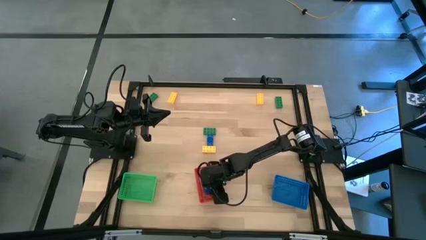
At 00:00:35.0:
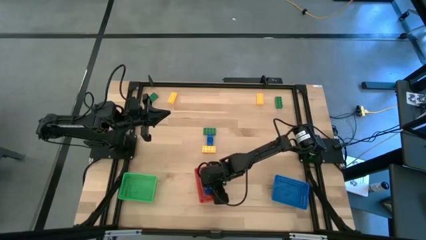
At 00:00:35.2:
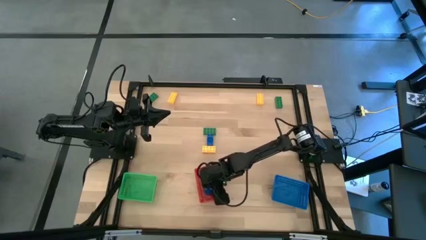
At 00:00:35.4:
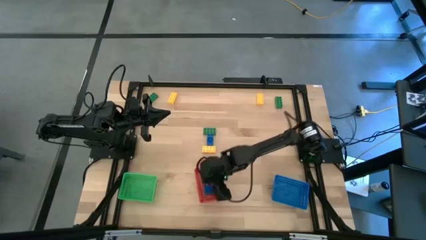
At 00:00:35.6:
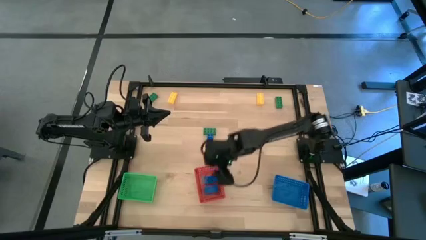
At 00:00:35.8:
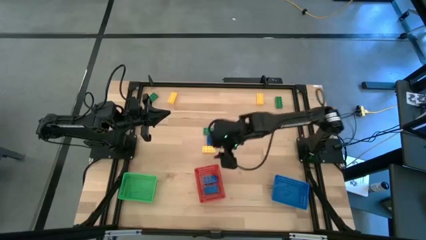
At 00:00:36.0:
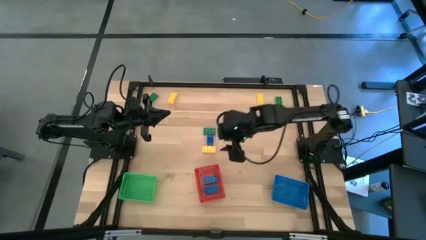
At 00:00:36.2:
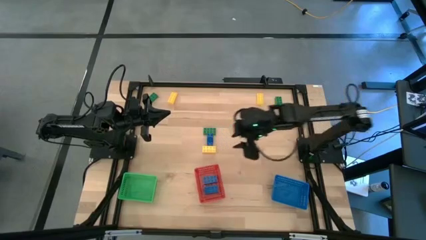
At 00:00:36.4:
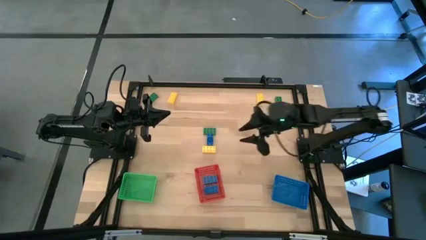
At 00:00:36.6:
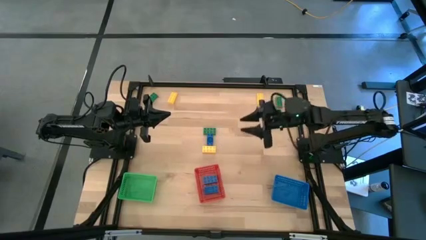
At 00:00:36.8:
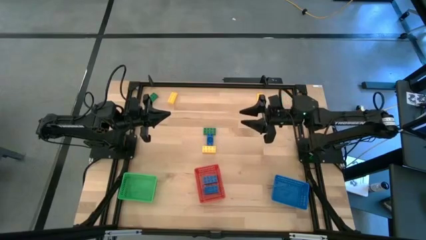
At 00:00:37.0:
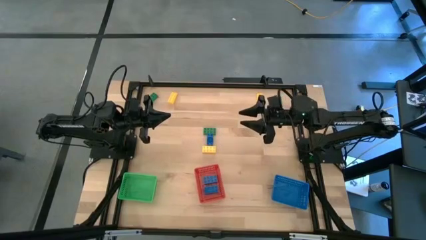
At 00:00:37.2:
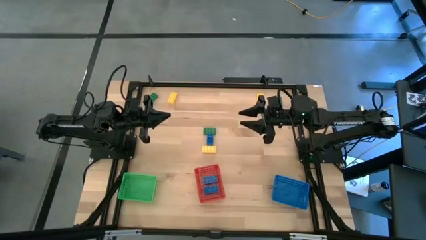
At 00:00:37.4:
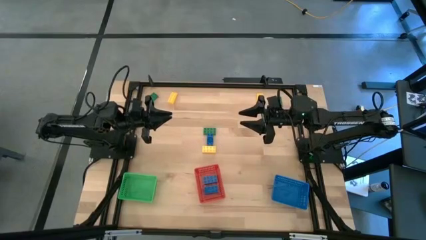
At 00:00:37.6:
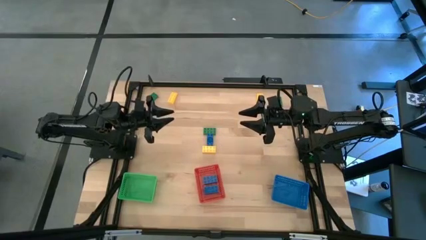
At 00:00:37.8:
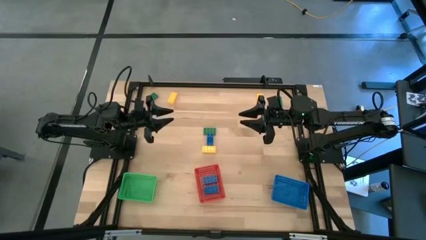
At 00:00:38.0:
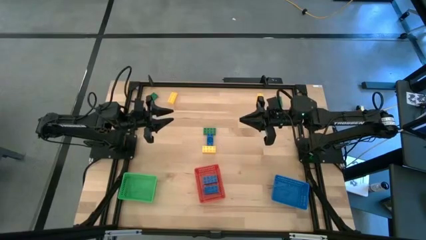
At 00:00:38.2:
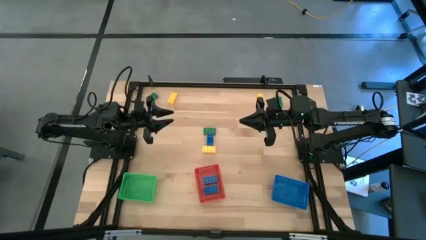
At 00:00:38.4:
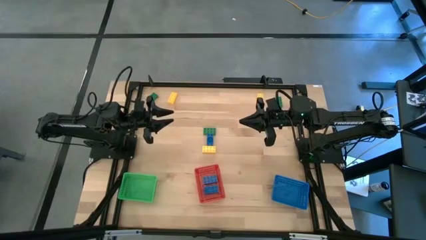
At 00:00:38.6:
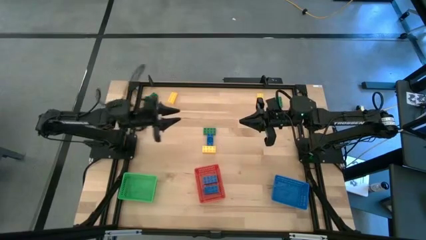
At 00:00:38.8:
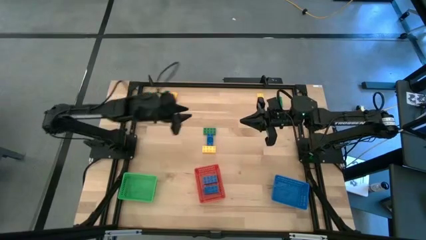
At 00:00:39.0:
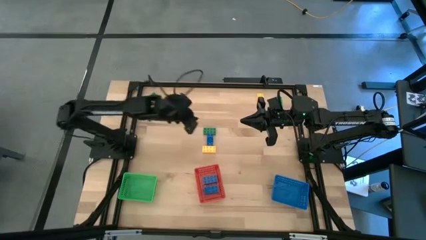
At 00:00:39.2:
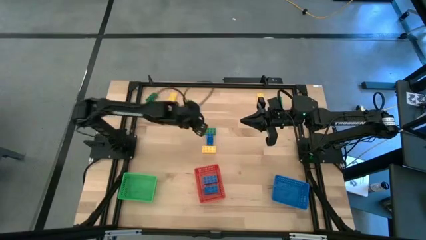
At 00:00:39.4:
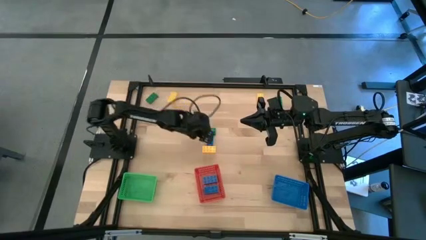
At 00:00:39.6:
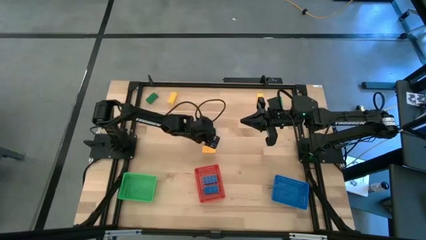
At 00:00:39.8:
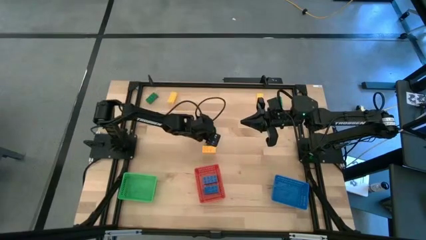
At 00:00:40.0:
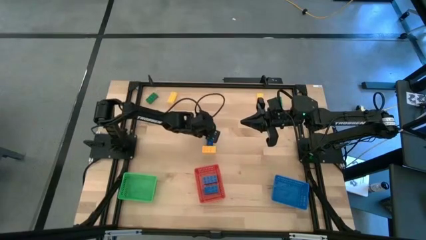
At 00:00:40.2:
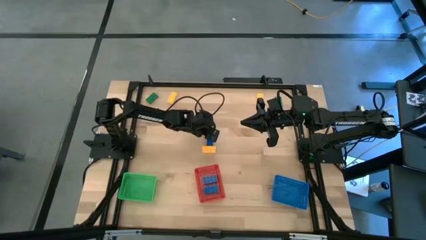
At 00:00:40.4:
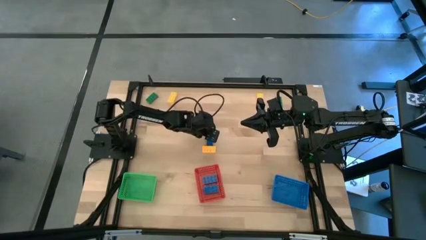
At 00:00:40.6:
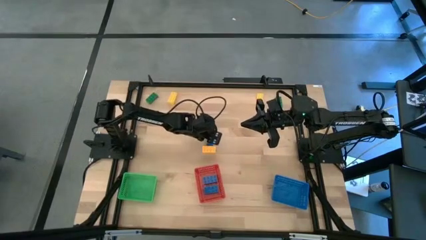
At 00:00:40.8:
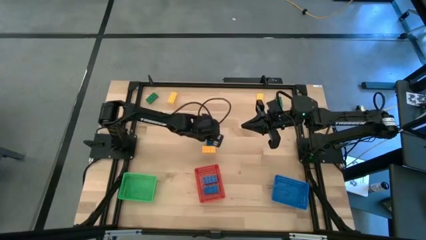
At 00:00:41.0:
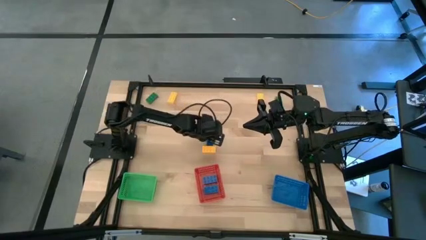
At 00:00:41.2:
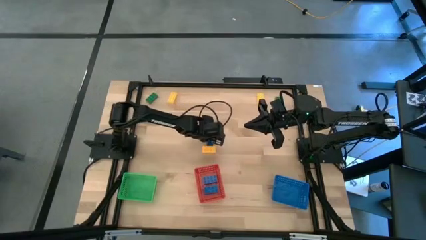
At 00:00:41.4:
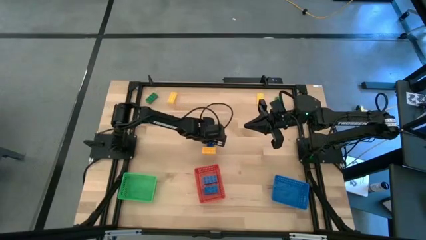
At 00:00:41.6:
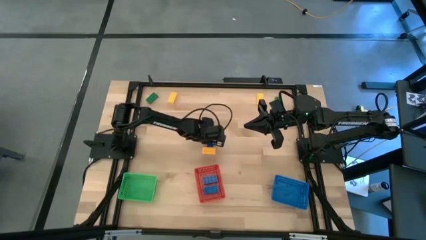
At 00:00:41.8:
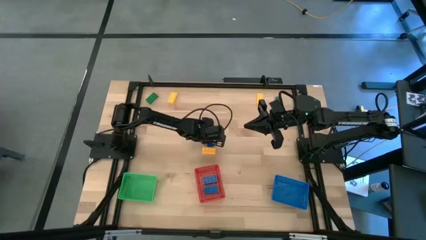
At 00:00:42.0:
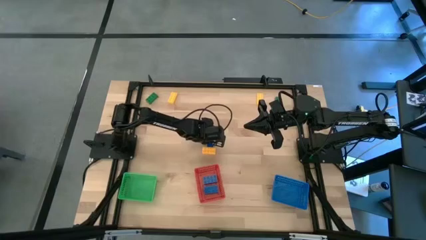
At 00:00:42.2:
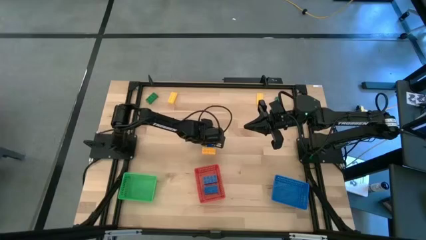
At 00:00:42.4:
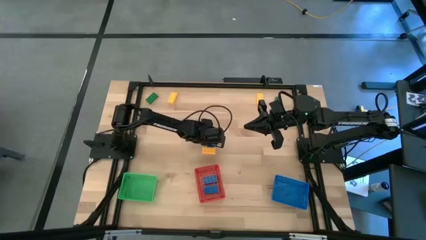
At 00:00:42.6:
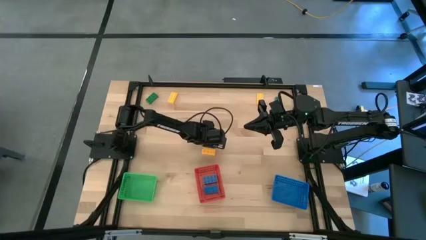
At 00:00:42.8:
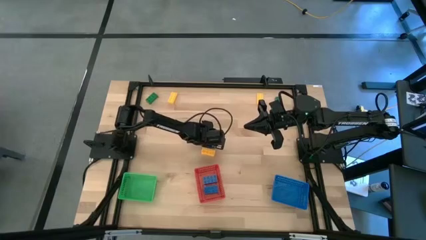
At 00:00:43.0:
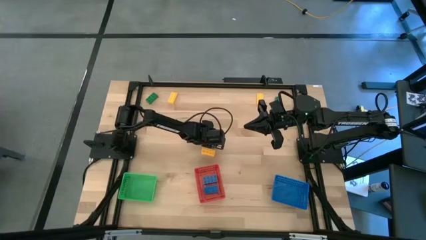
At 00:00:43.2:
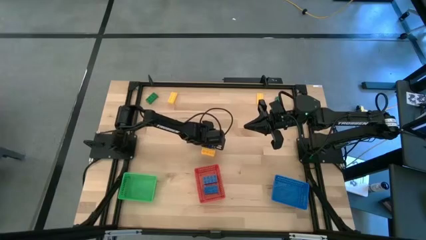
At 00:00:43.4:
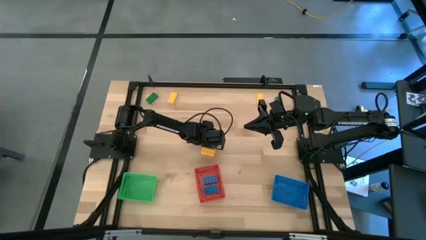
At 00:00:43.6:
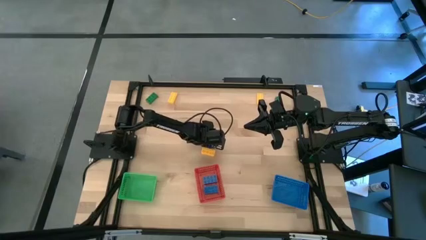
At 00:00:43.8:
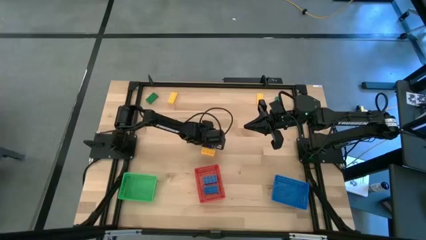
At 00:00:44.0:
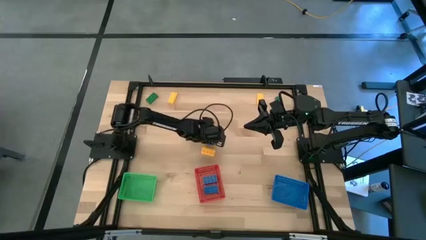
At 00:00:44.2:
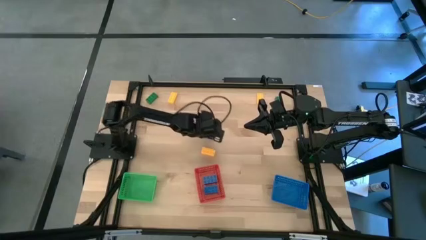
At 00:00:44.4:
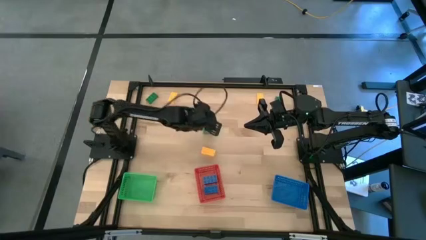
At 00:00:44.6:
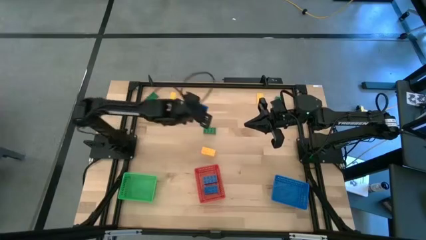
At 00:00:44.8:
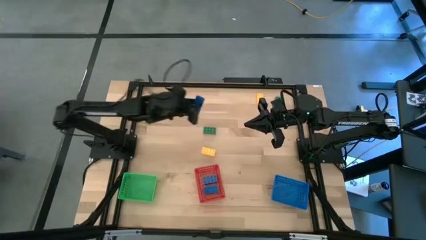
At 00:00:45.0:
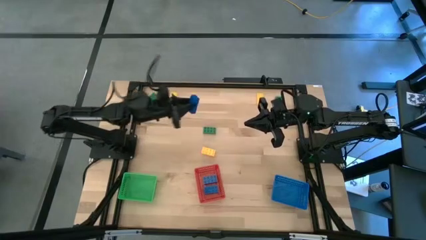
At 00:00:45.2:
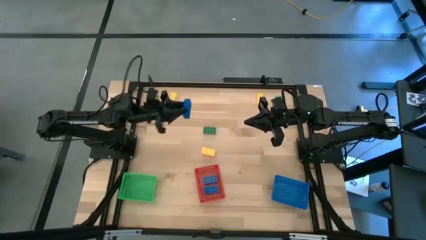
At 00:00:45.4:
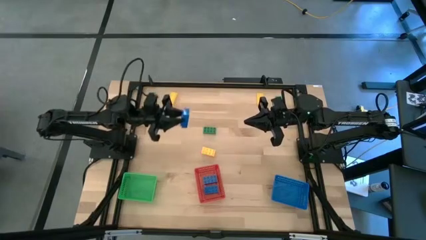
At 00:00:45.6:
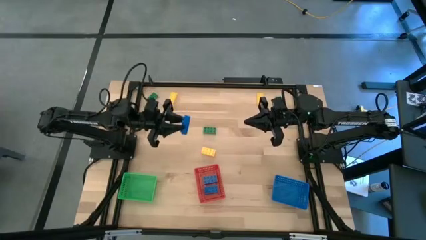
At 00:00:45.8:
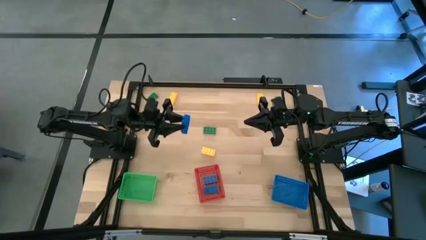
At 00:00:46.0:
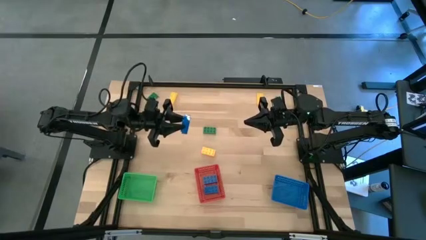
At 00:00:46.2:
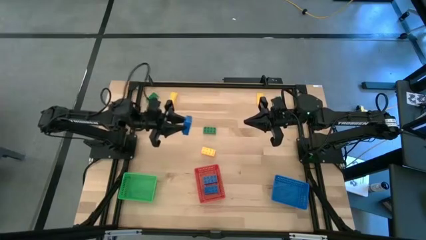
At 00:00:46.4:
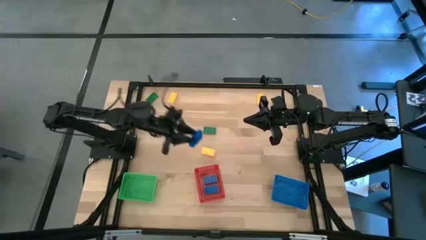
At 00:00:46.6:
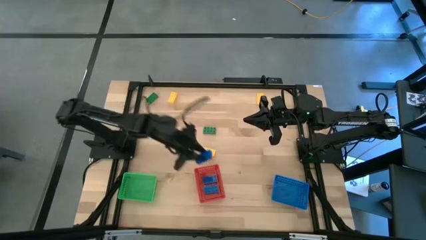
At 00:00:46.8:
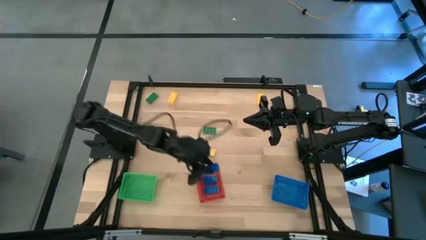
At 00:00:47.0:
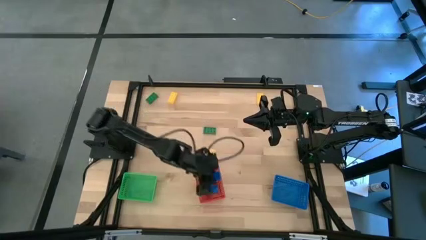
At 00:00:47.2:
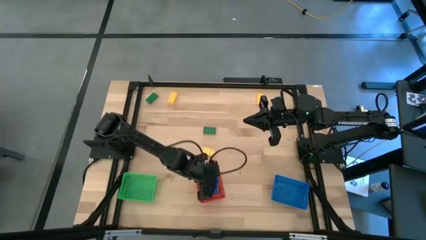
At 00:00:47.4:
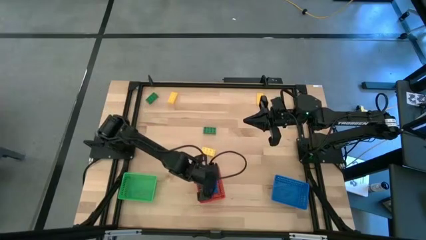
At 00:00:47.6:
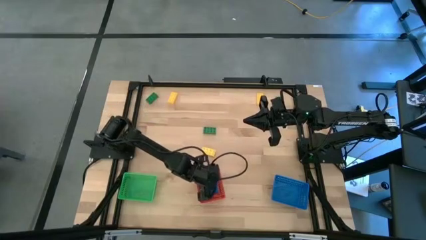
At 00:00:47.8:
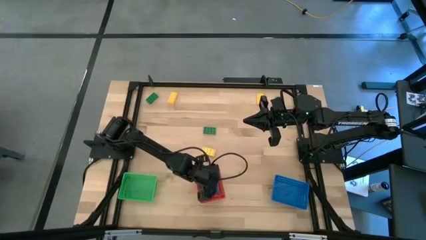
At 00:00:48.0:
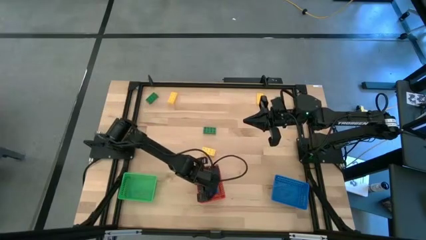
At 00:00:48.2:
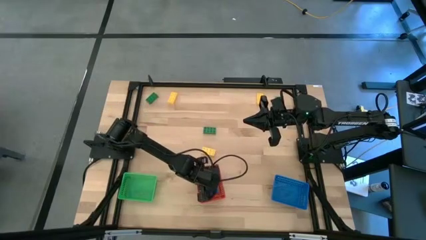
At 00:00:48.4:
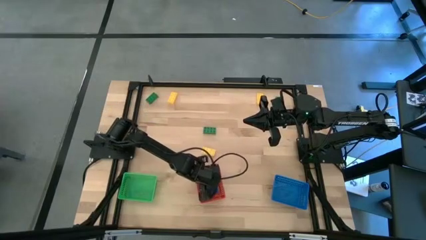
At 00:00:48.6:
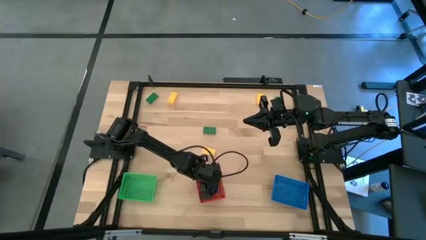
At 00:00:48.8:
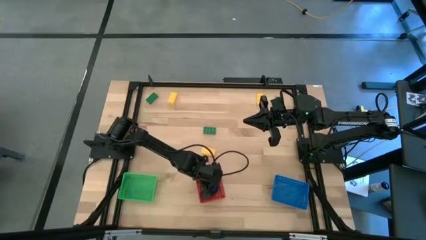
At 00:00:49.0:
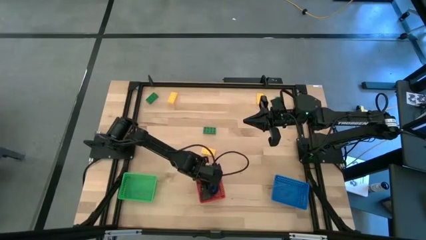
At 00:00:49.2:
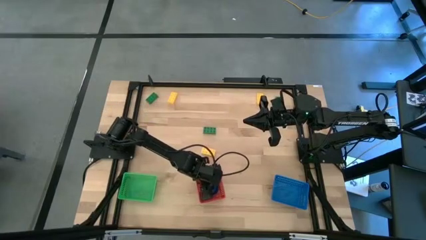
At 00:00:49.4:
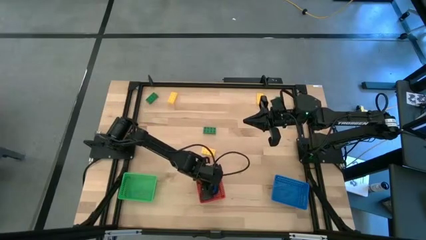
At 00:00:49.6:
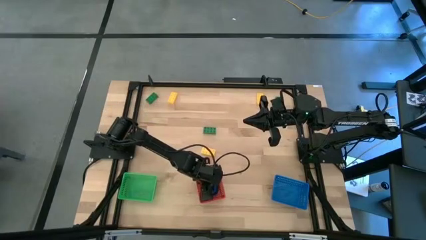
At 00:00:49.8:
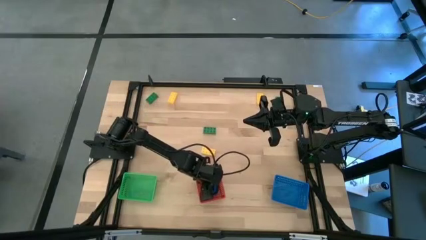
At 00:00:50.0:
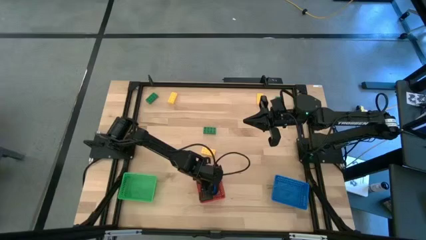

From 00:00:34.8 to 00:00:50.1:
Task: Sort & place blocks by color
Put the blue game piece into the red bin
